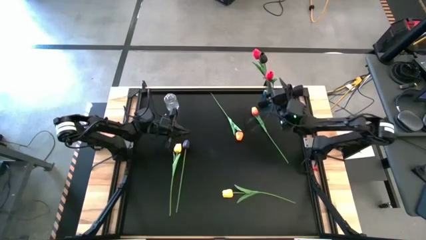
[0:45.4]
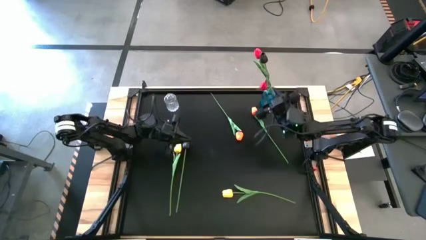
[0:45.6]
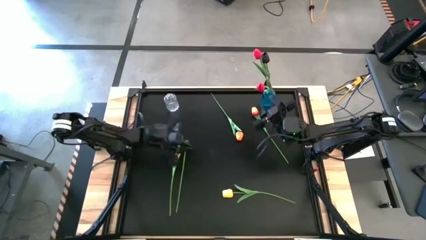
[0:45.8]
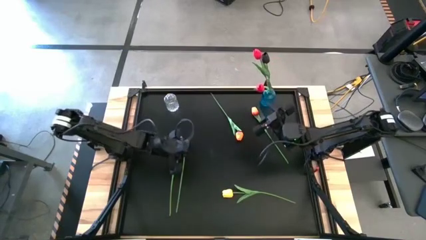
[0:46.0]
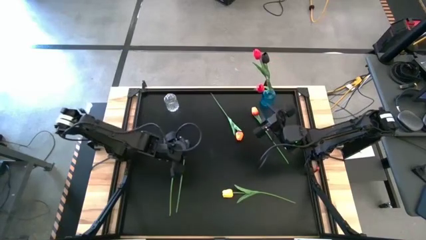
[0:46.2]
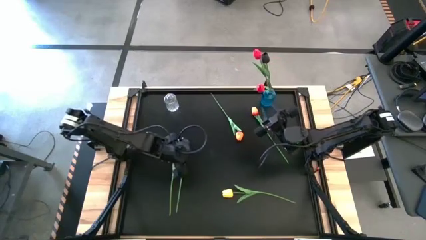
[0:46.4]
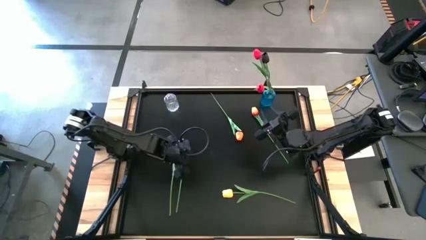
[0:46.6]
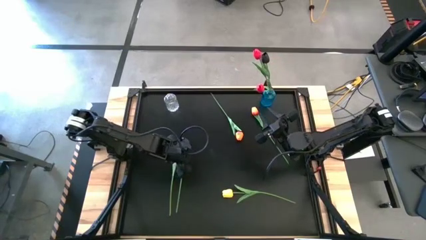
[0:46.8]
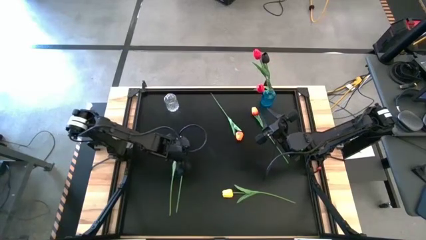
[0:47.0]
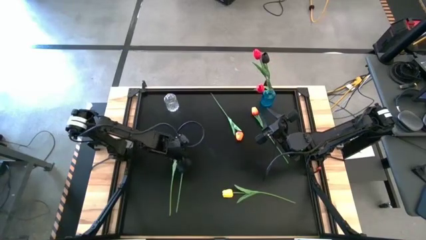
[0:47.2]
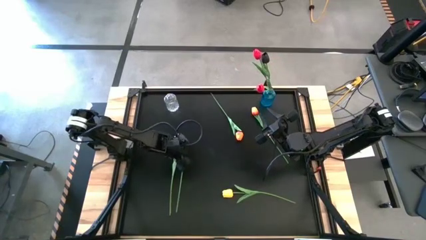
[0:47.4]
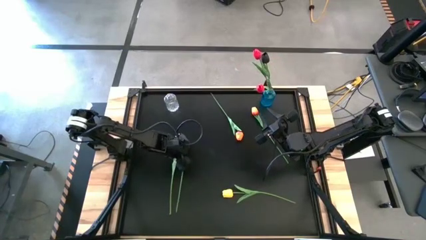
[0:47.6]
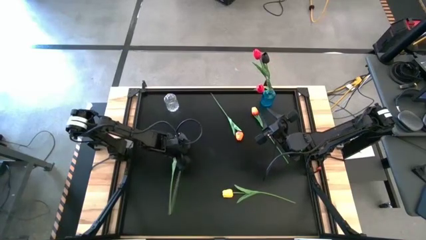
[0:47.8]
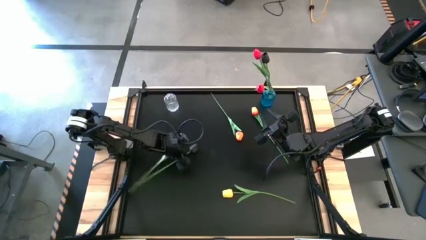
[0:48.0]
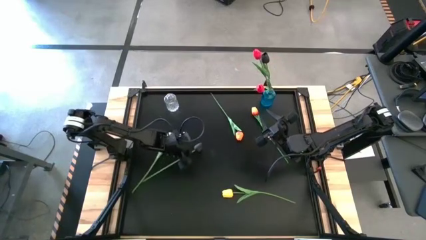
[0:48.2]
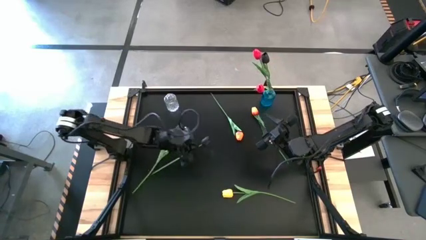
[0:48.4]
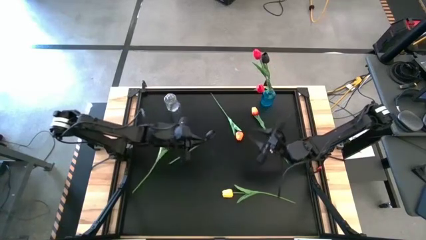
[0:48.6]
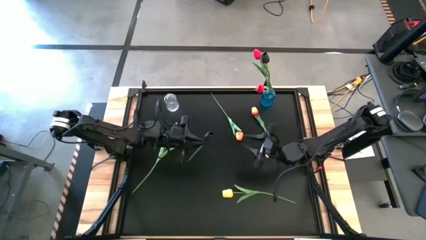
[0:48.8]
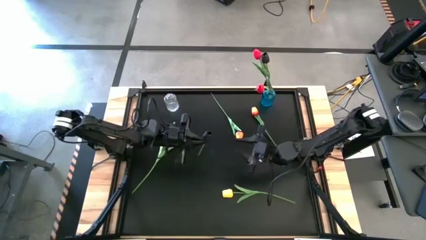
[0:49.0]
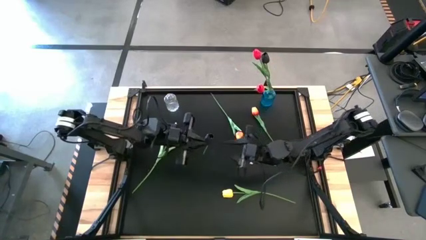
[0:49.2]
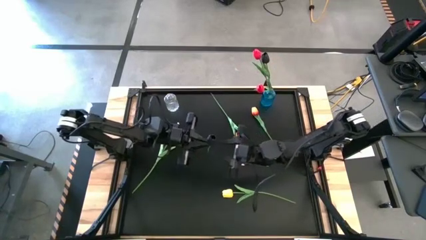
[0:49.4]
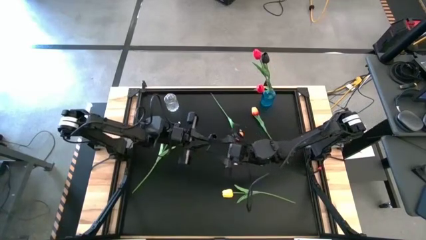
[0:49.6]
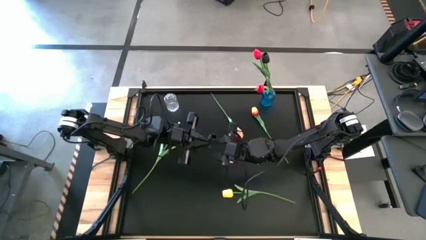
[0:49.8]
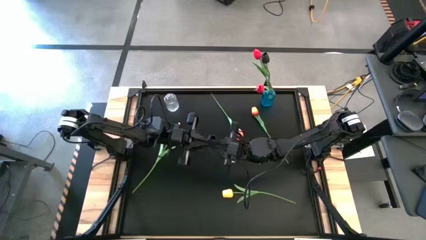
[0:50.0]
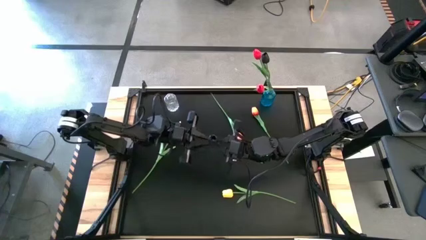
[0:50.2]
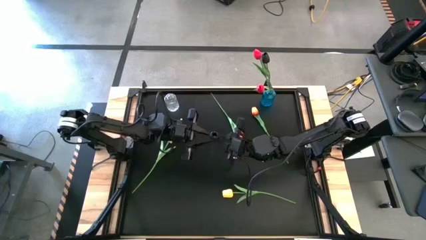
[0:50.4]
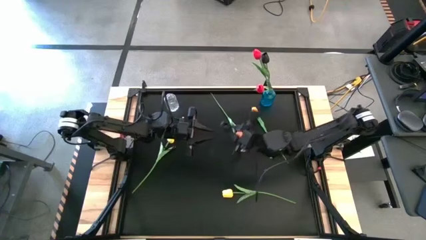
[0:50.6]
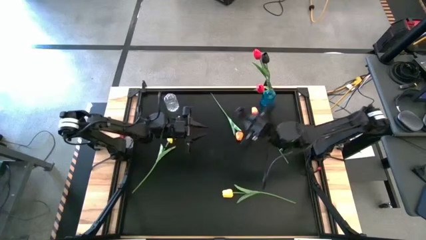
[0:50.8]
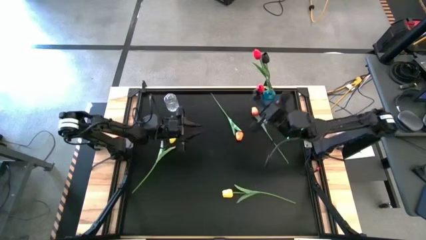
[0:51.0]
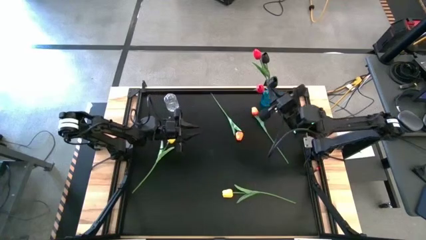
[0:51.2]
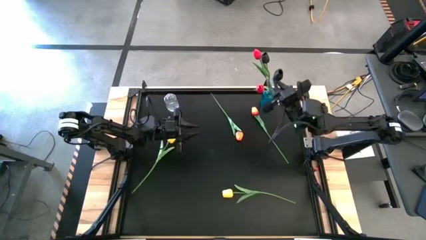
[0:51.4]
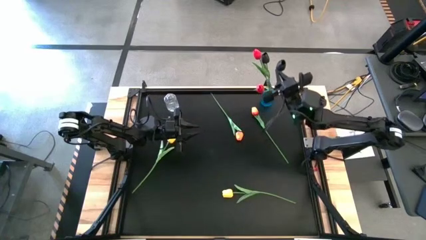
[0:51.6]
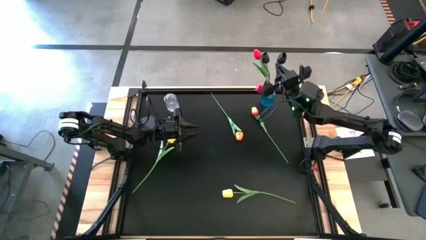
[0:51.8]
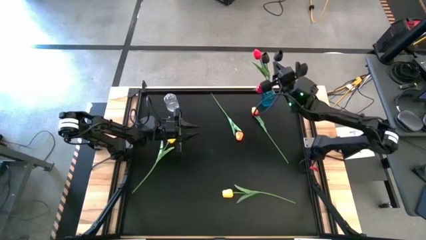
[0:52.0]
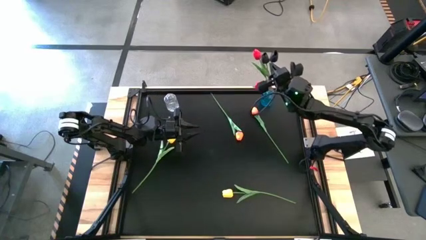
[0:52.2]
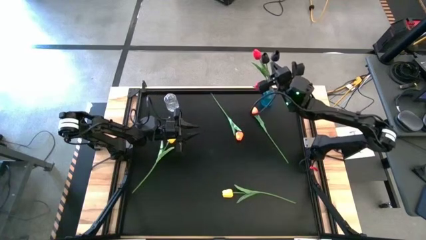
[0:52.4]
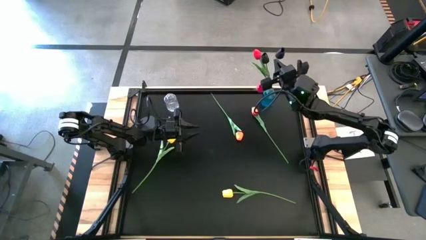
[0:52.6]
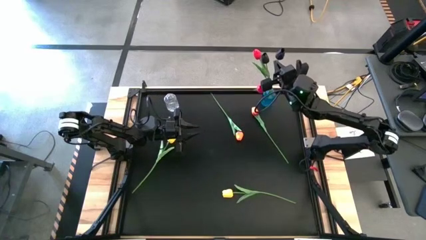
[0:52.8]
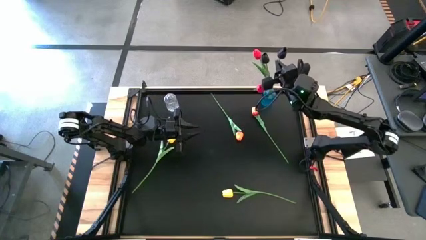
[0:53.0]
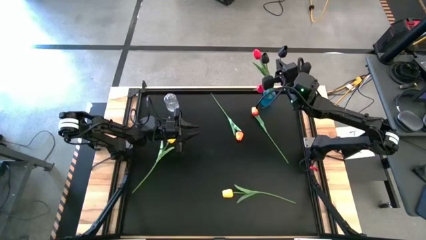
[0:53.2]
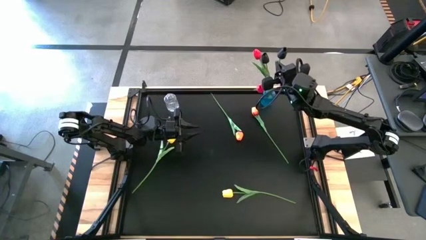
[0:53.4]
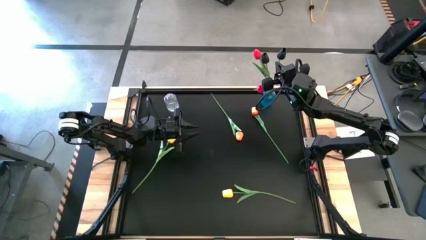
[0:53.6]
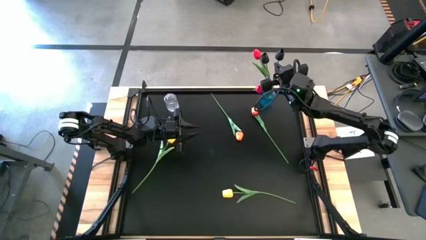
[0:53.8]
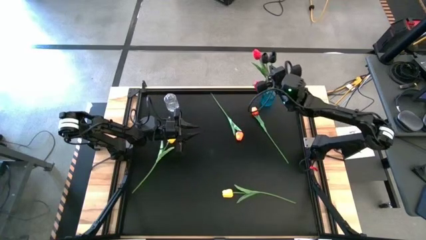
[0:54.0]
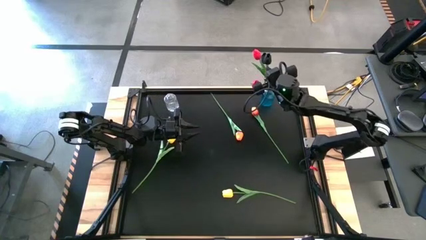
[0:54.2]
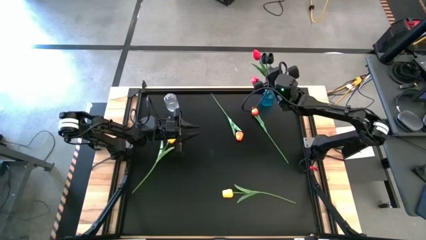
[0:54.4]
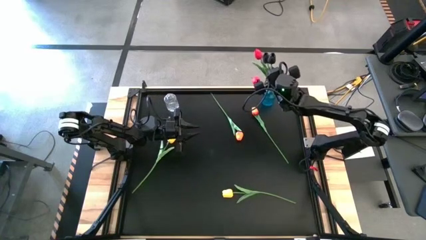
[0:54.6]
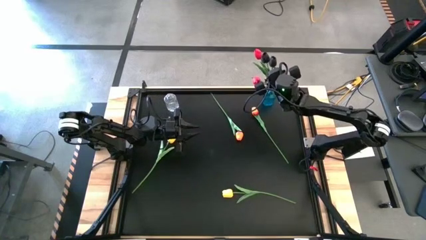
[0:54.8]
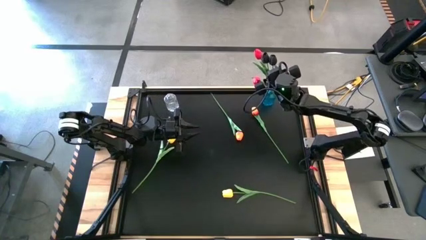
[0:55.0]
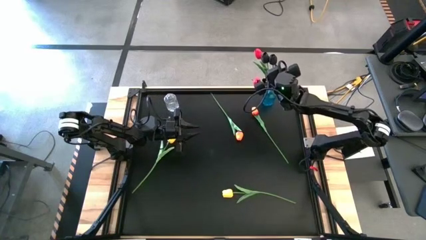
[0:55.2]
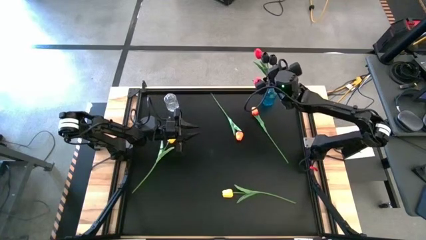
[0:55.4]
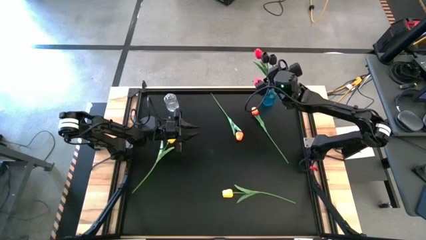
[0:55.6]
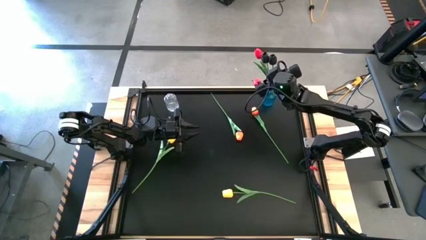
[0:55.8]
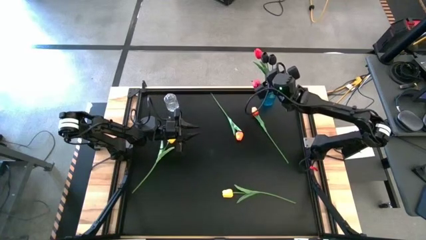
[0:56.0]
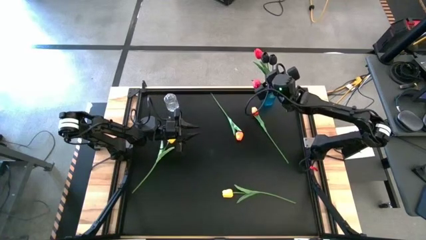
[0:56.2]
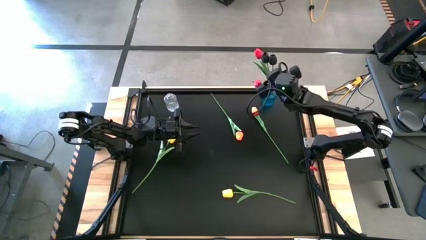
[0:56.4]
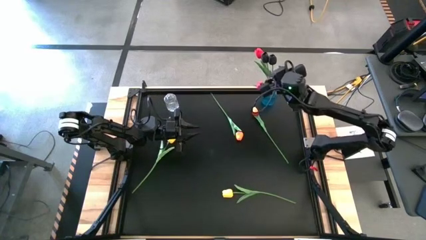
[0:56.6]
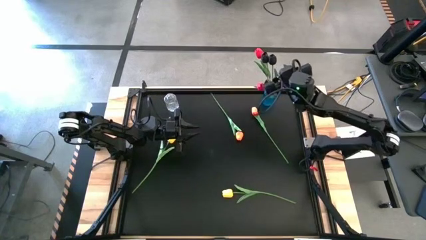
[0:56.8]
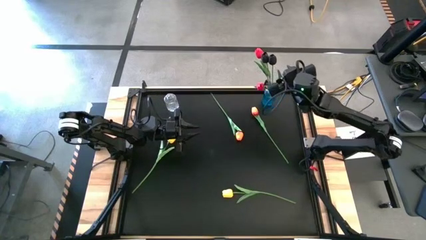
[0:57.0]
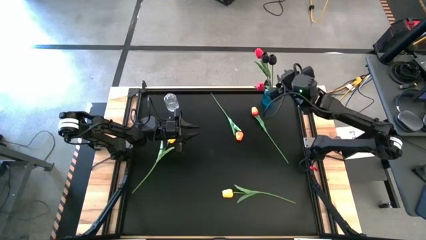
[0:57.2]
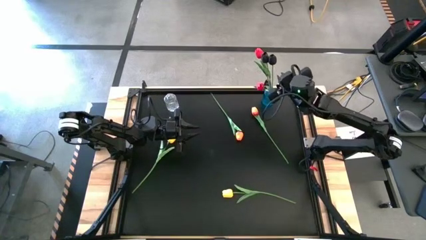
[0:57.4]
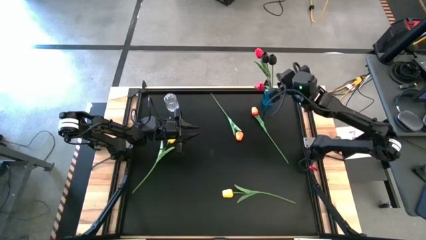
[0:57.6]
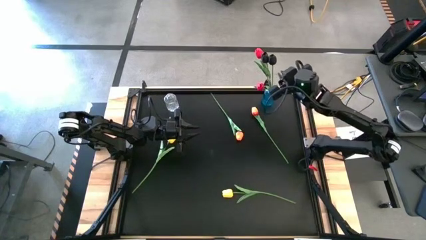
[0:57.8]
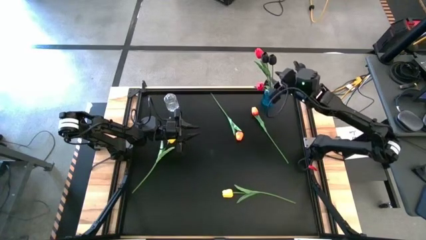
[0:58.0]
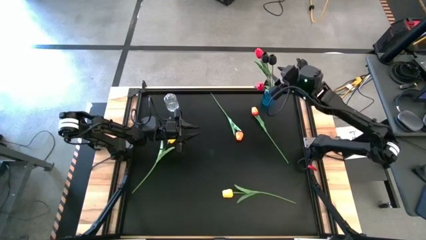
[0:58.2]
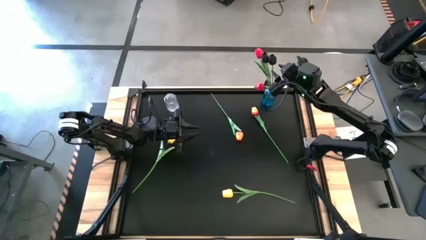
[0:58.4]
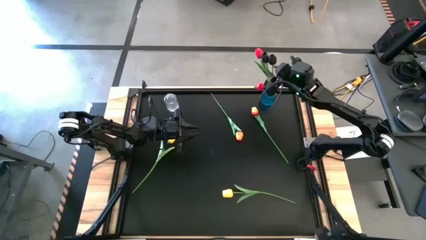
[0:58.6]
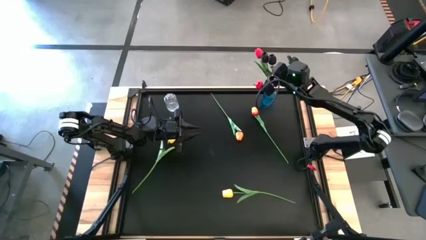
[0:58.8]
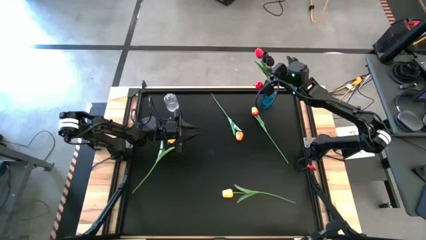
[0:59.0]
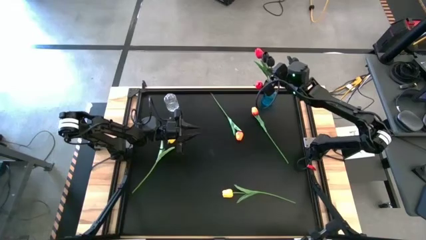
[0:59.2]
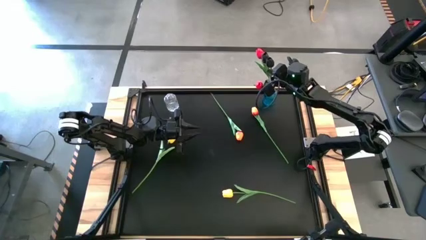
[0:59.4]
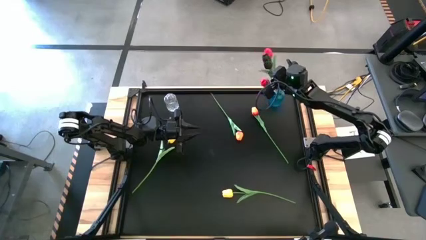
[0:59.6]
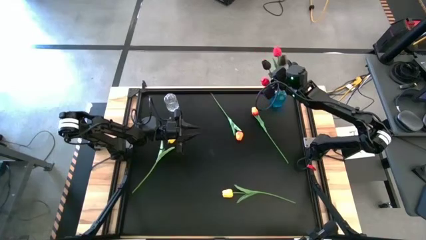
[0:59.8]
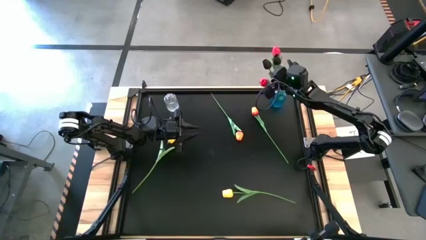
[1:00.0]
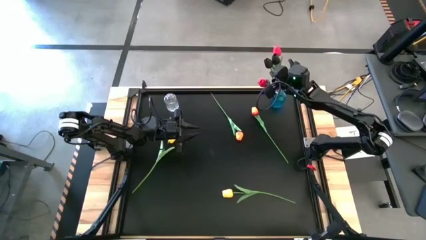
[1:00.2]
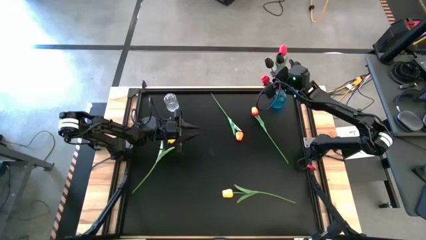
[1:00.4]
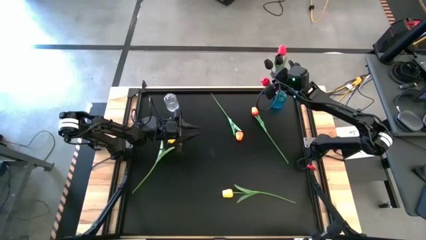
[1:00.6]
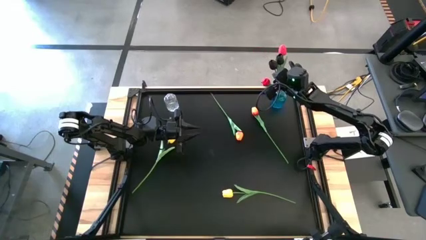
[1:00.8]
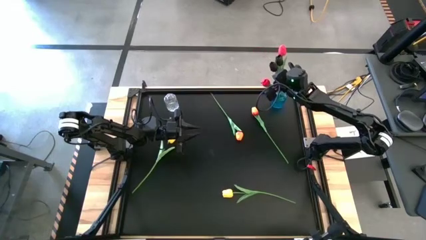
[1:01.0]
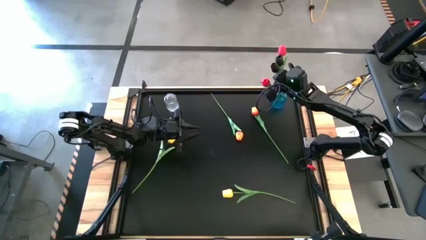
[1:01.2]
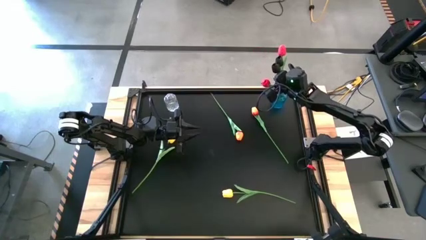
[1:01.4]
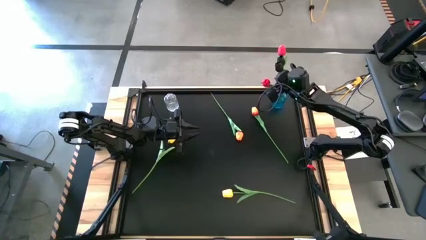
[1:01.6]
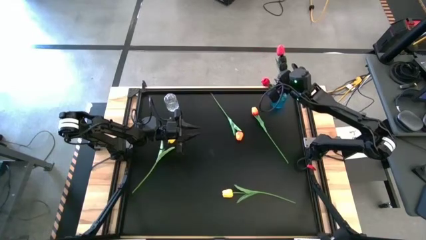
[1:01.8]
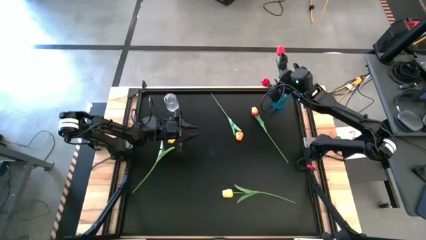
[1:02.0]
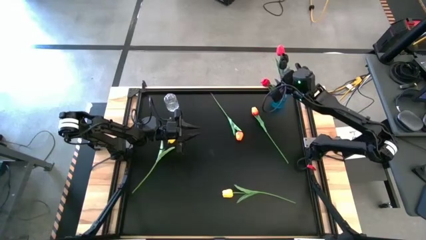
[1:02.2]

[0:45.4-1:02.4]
Task: Sort flowers into vase by color
Put the black tulip into the blue vase
